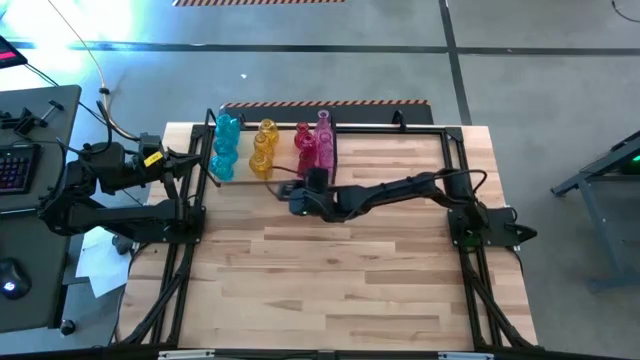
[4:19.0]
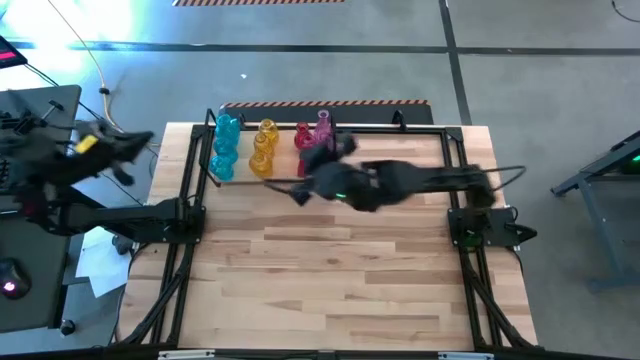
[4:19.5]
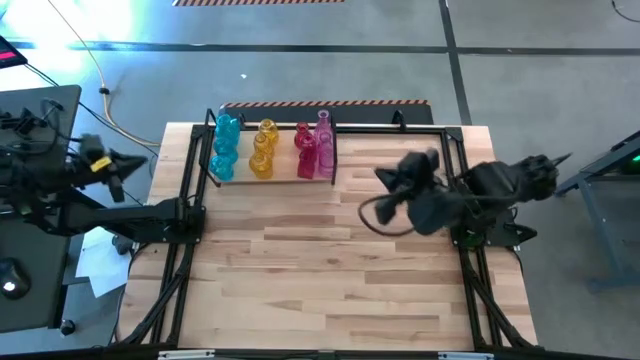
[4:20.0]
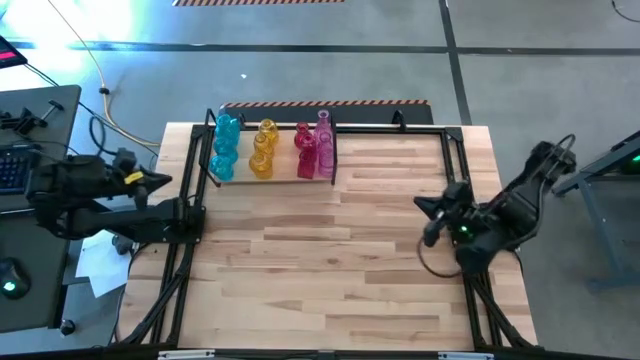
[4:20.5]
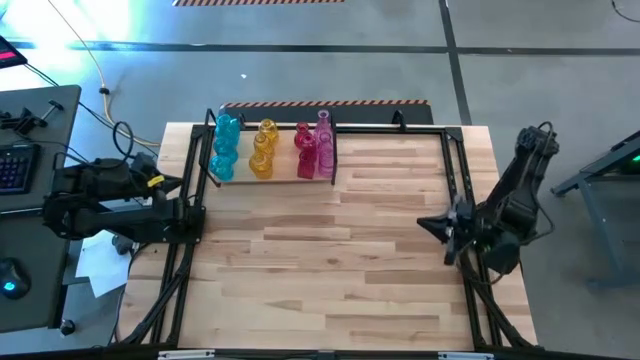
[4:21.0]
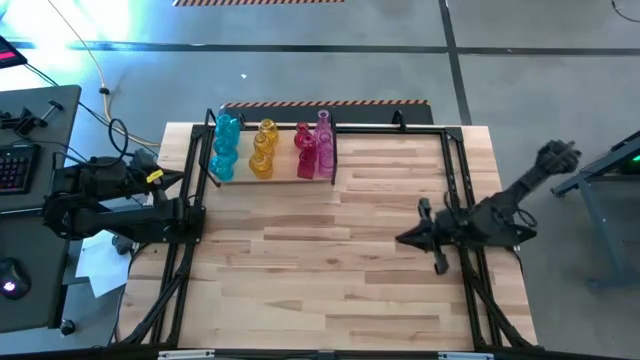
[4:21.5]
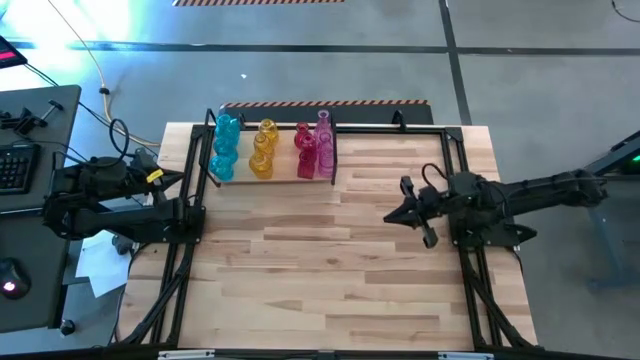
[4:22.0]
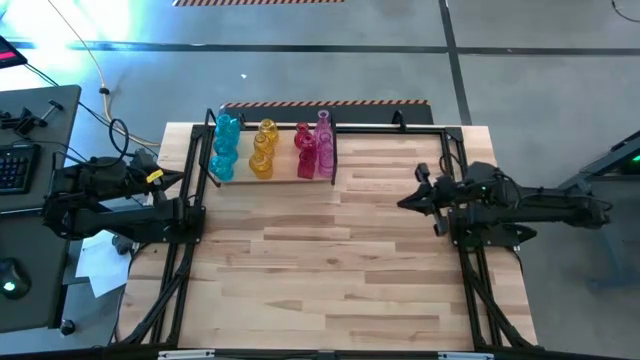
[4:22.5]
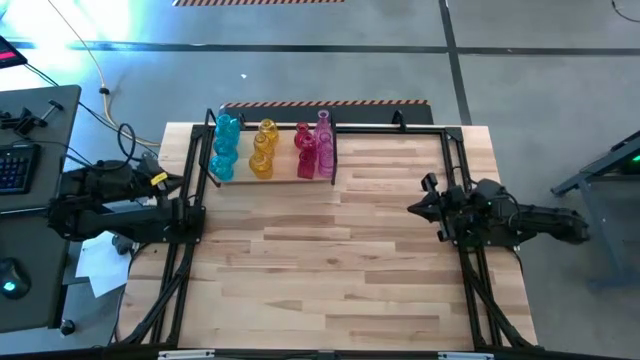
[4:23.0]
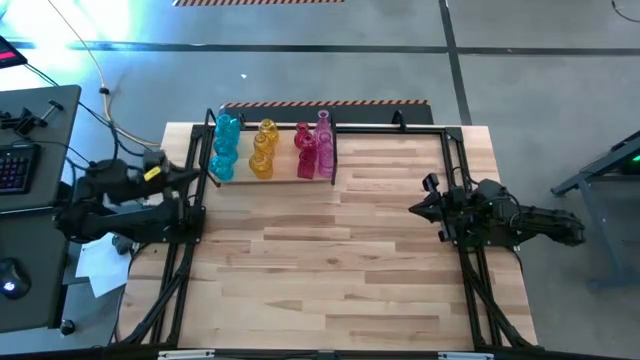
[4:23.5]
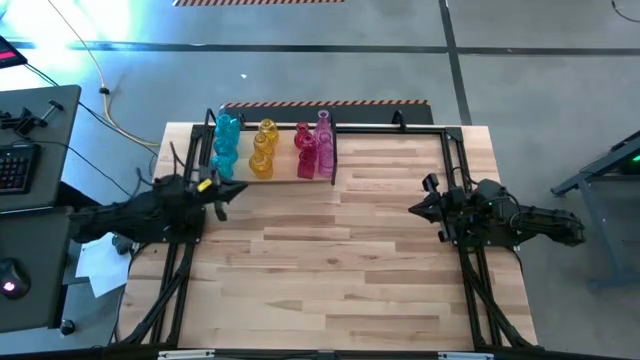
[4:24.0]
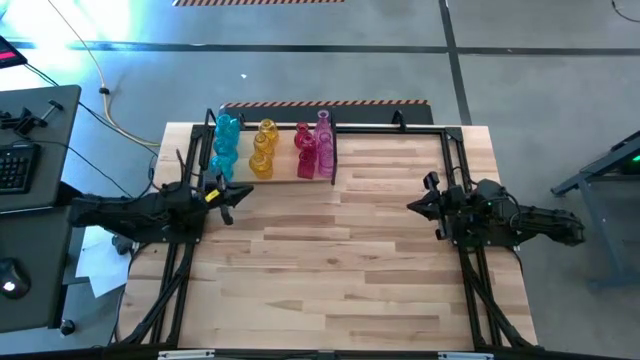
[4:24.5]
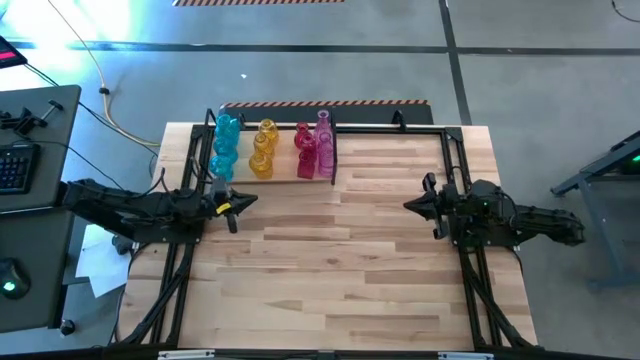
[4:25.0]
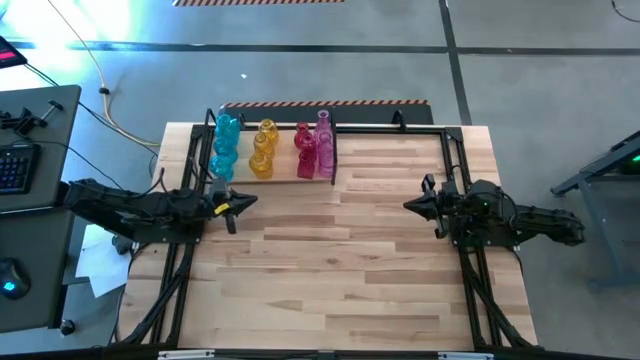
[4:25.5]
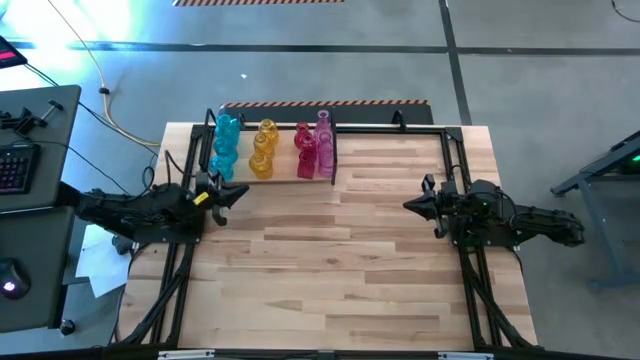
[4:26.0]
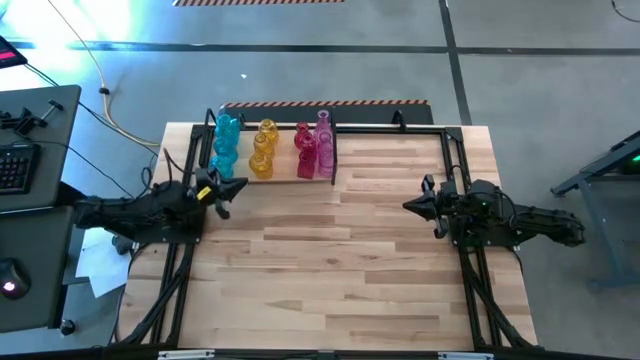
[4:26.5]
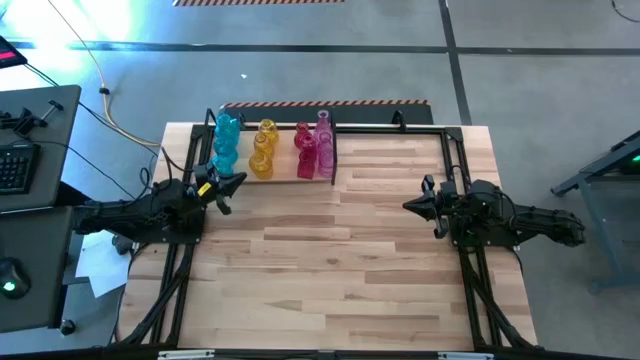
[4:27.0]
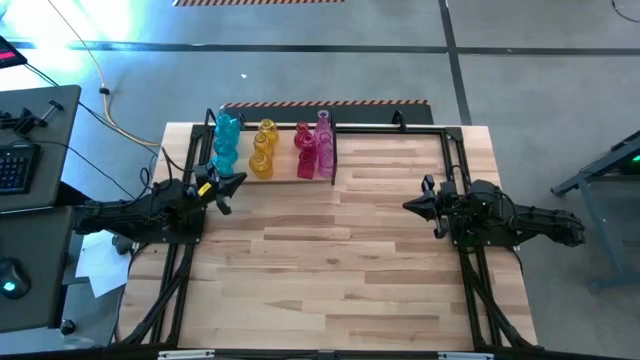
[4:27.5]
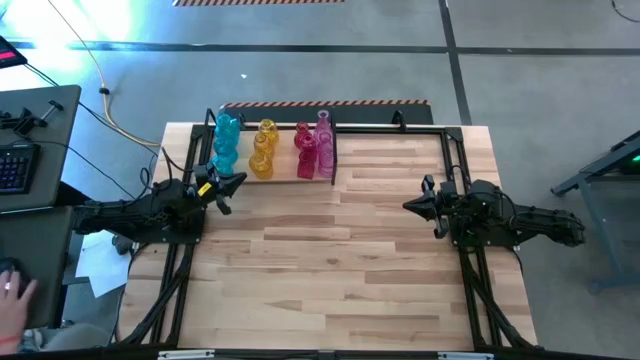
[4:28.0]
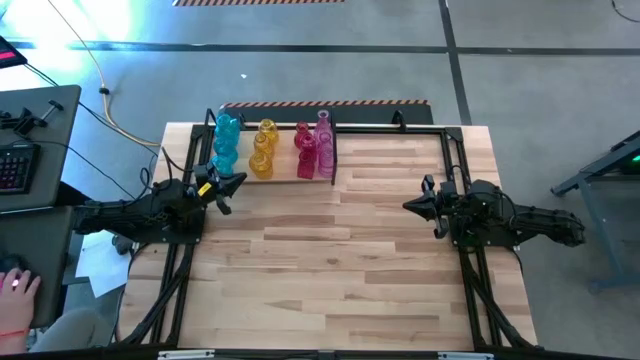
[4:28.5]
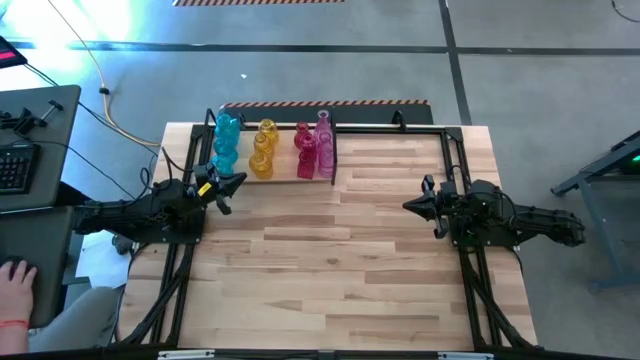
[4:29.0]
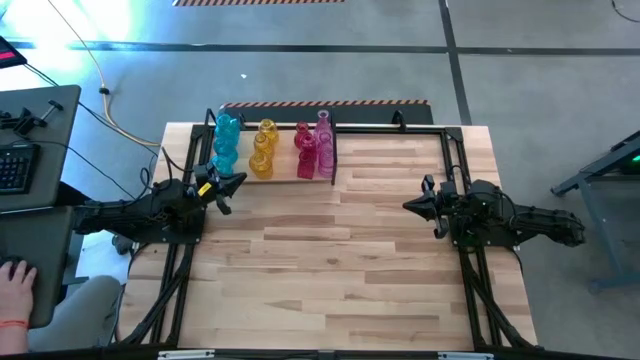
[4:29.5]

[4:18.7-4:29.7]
Task: sort vases onto shelf
Return to Home Position

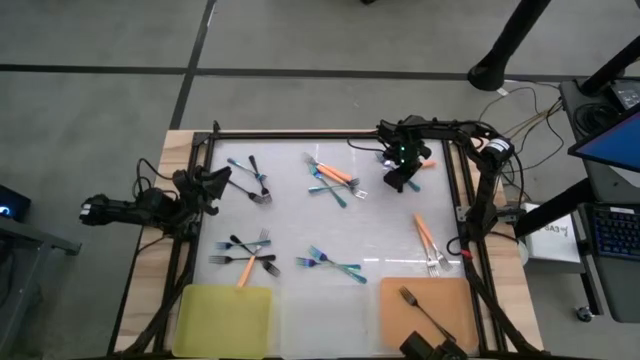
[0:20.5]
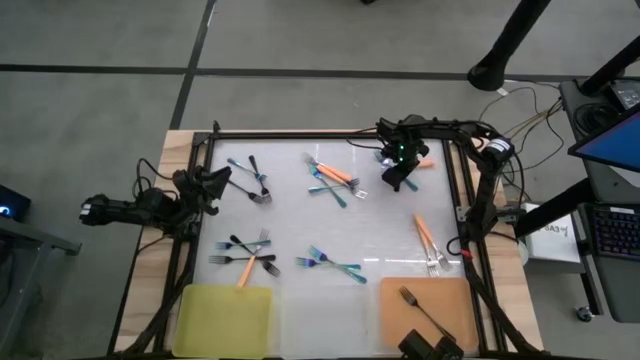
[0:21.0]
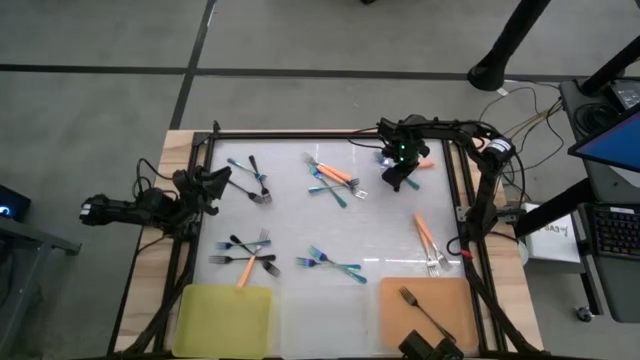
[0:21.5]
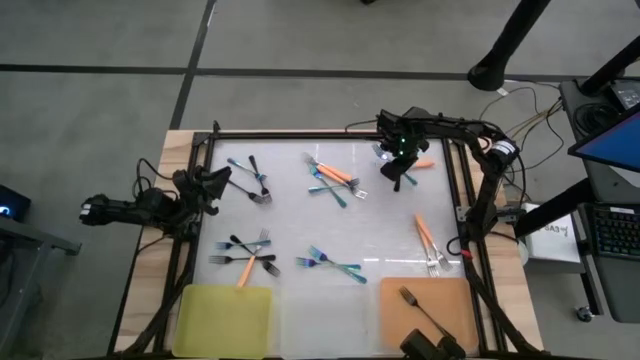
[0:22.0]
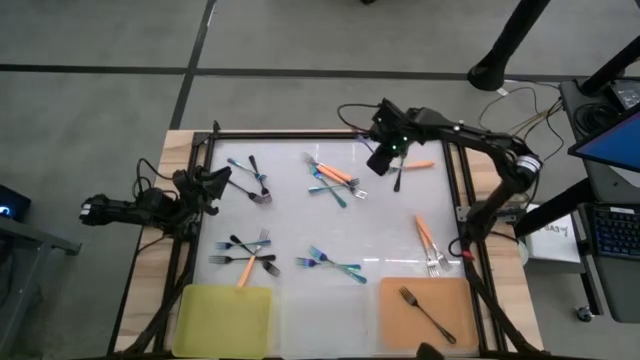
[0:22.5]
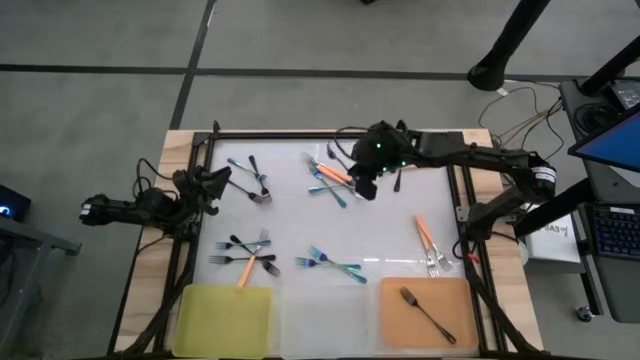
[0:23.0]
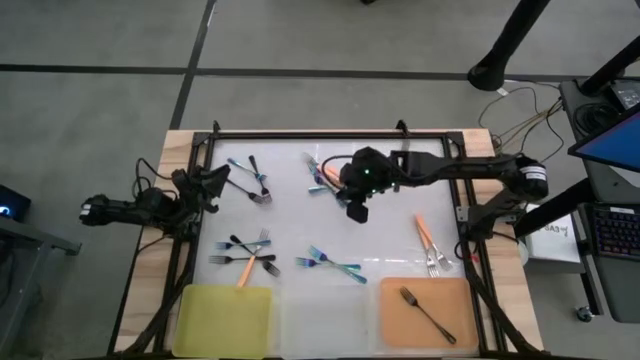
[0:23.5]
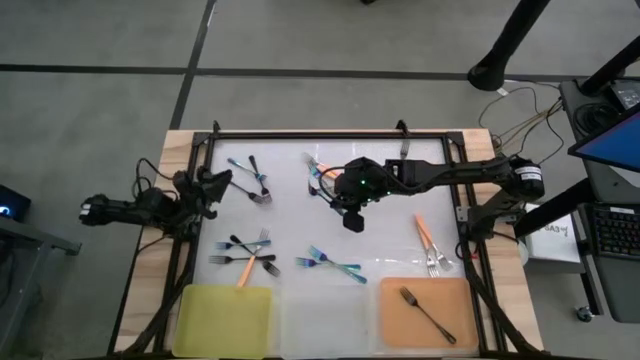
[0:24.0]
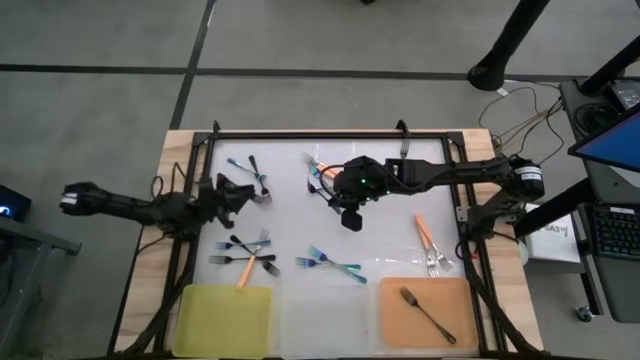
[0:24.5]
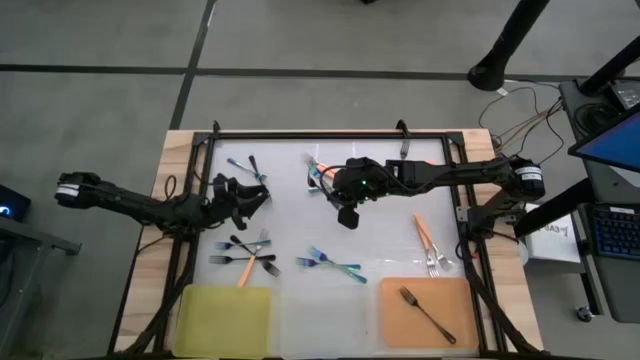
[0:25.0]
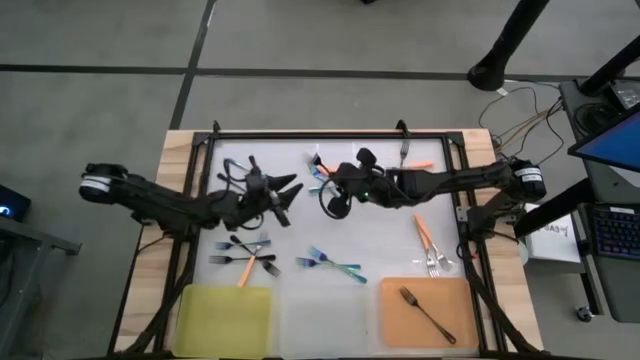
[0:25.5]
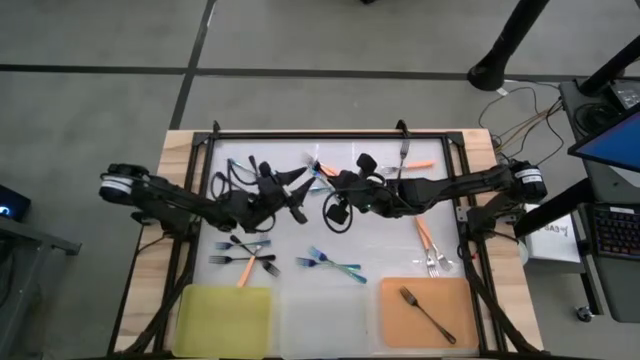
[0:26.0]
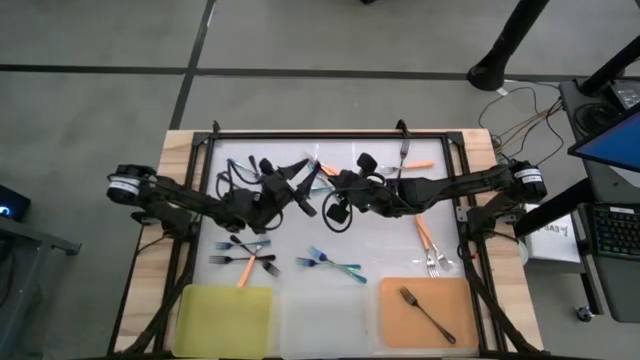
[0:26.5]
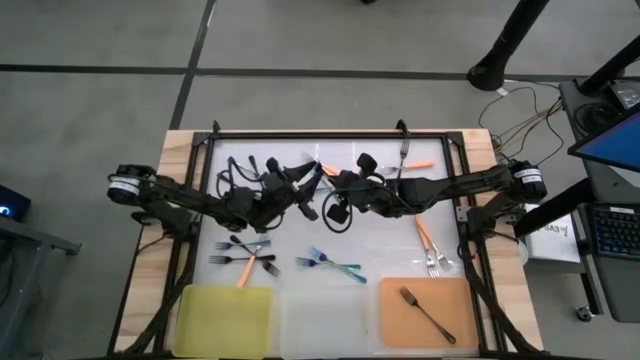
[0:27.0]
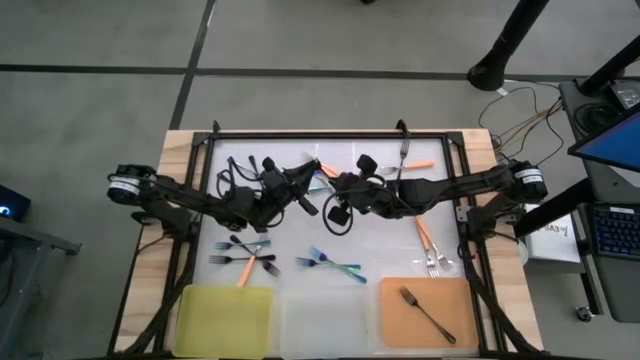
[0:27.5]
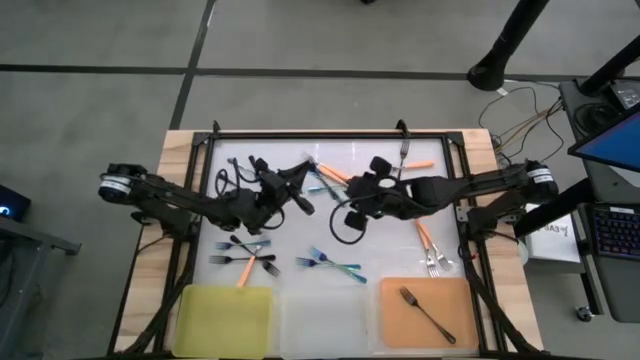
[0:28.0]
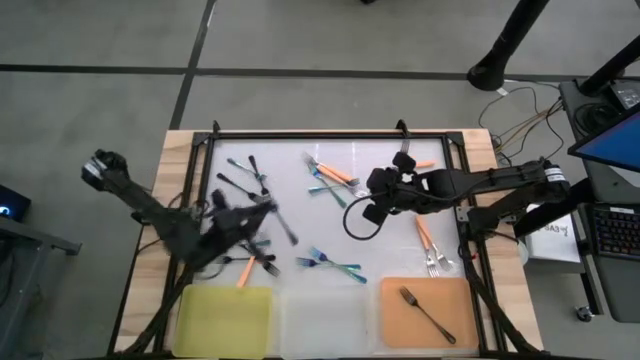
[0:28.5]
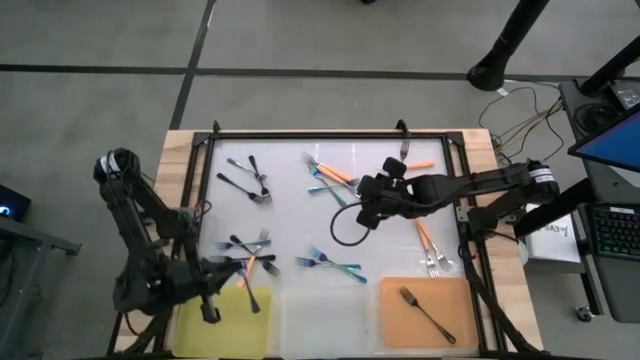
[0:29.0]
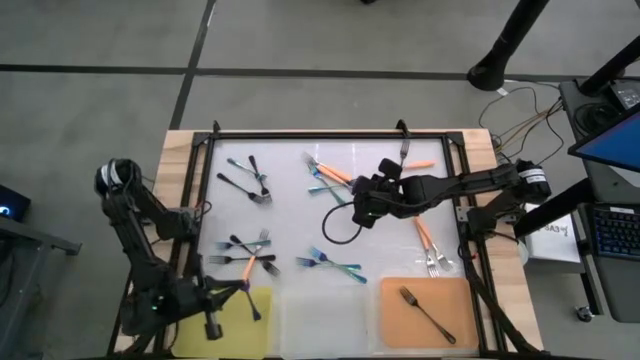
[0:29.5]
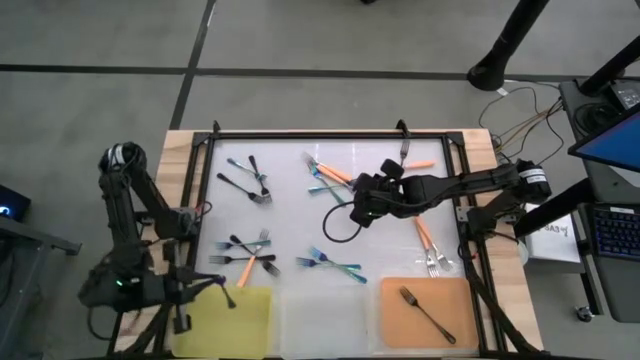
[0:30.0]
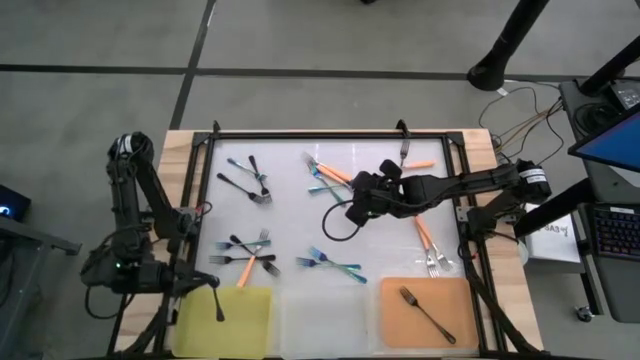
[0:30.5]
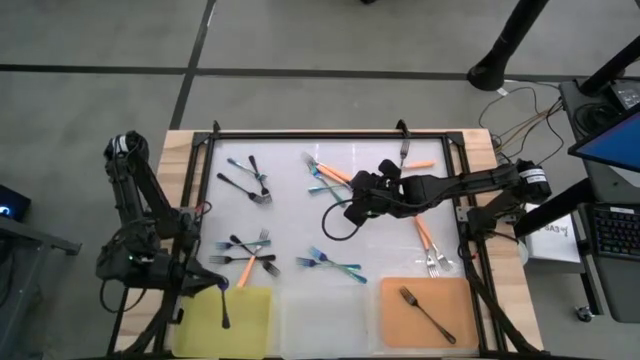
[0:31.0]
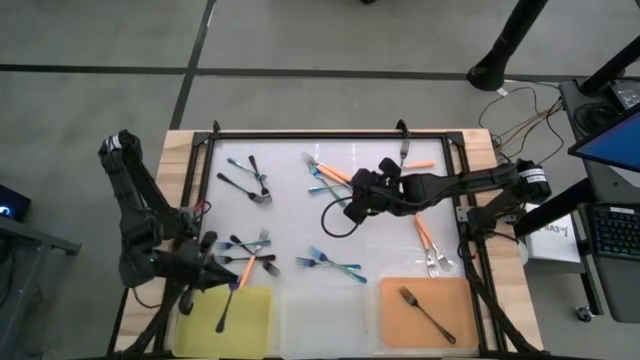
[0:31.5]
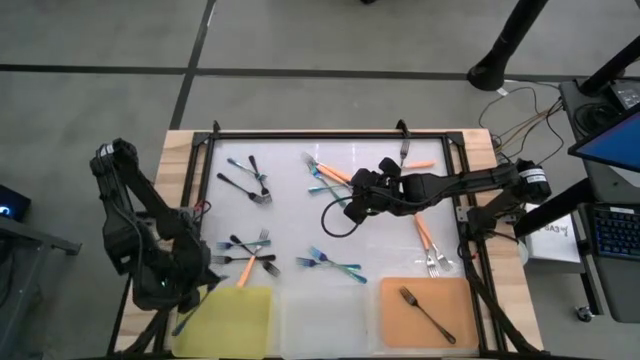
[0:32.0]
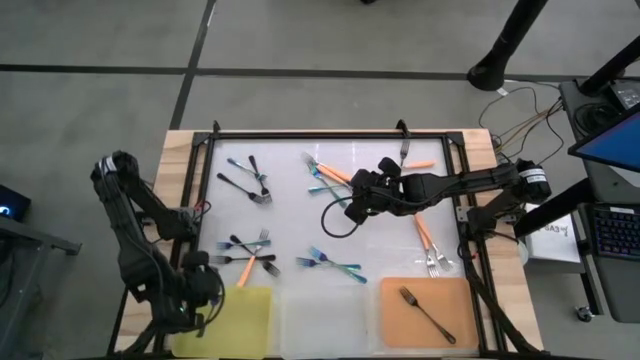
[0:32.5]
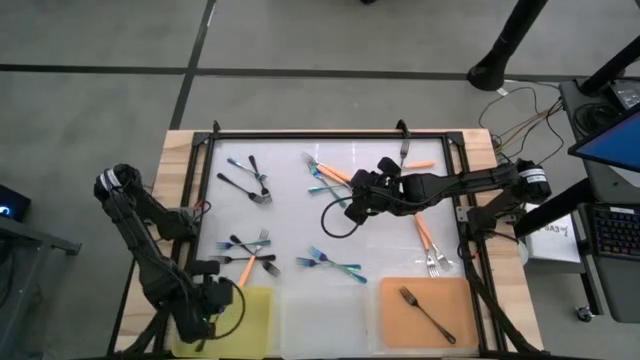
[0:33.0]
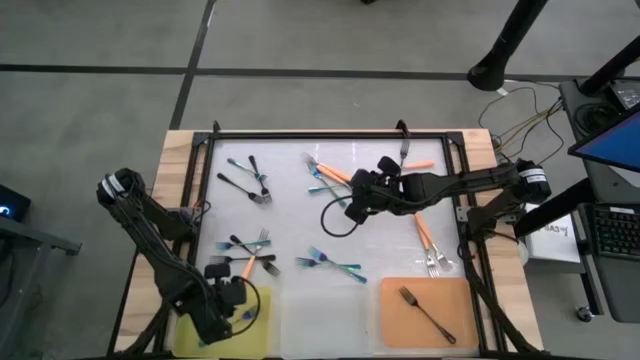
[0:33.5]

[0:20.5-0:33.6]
Task: Sort silverware by color (type)
Put the blue fork into the yellow bin
